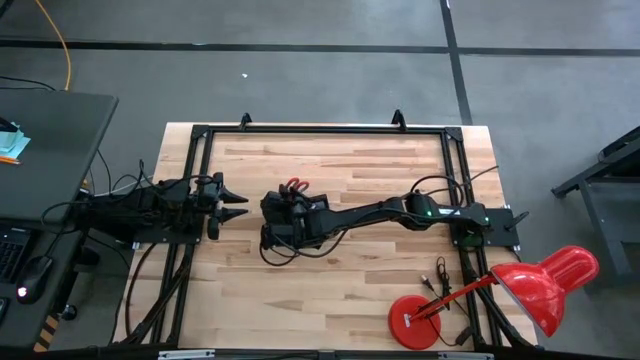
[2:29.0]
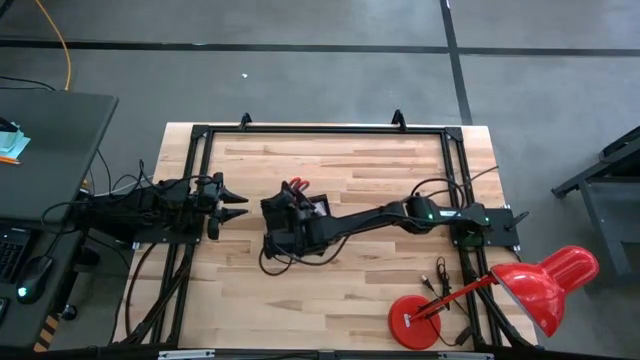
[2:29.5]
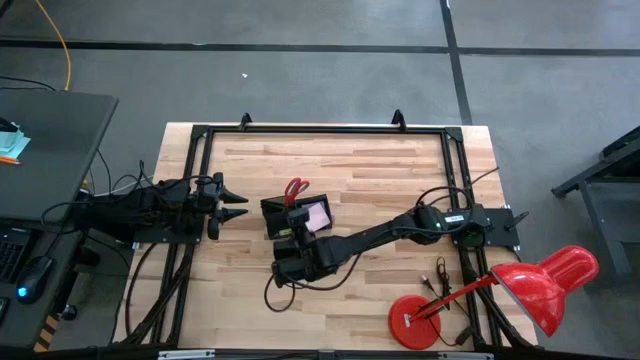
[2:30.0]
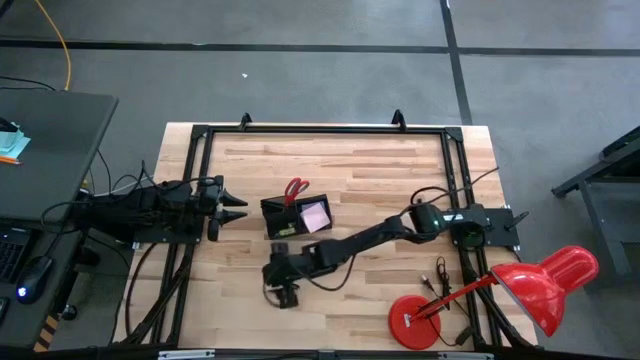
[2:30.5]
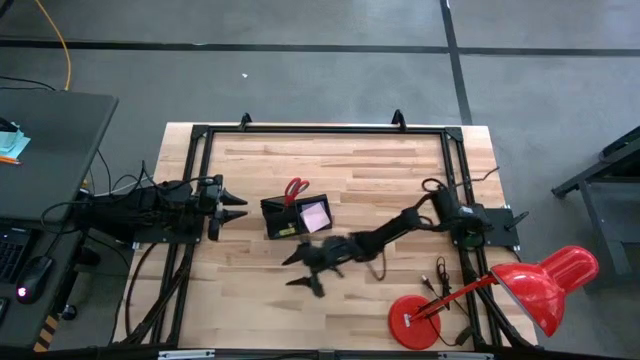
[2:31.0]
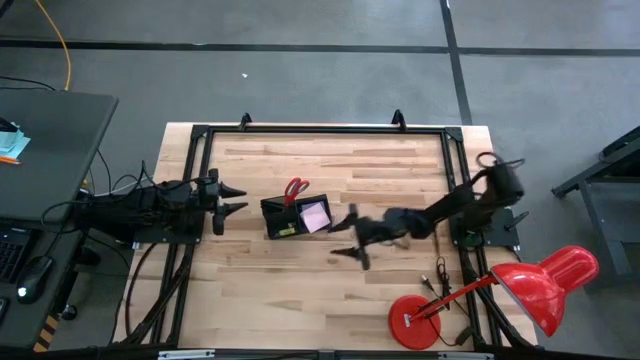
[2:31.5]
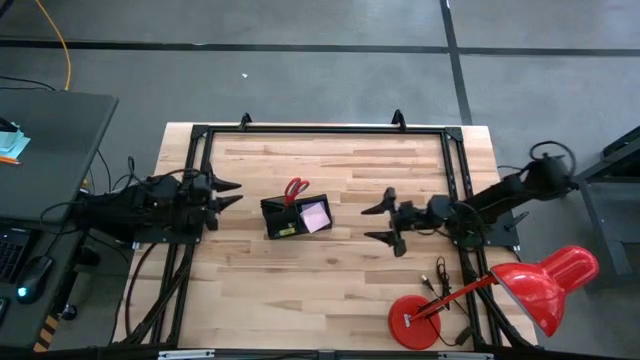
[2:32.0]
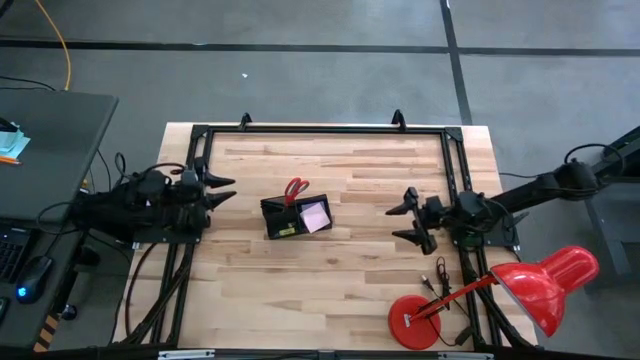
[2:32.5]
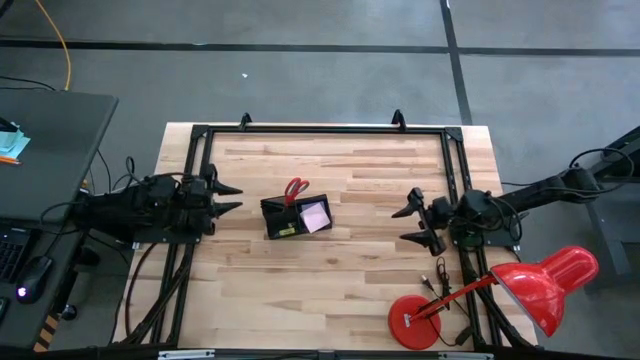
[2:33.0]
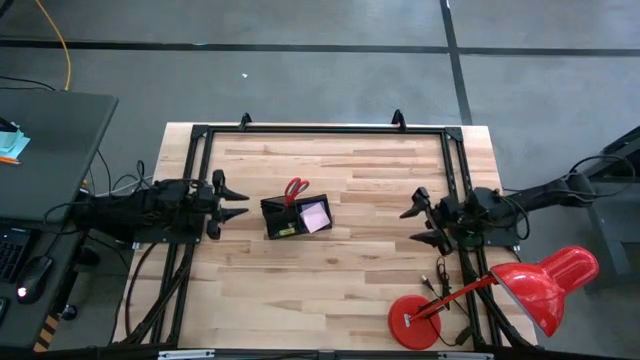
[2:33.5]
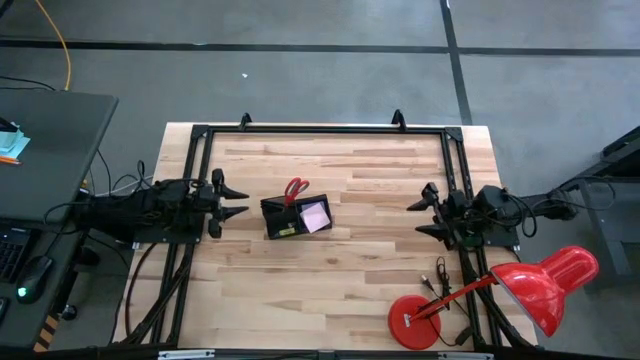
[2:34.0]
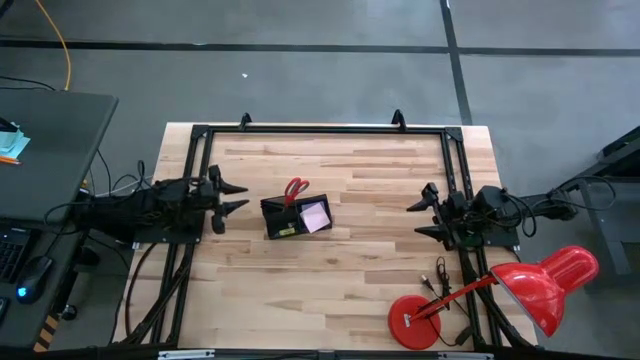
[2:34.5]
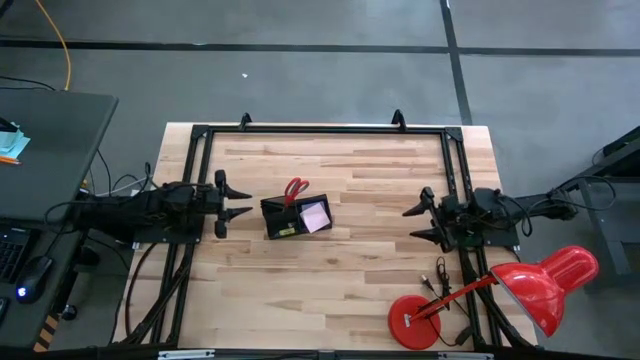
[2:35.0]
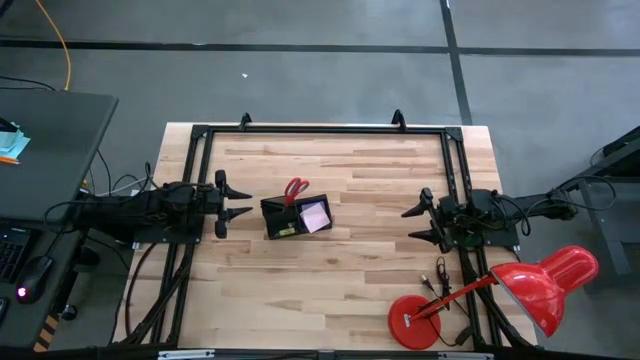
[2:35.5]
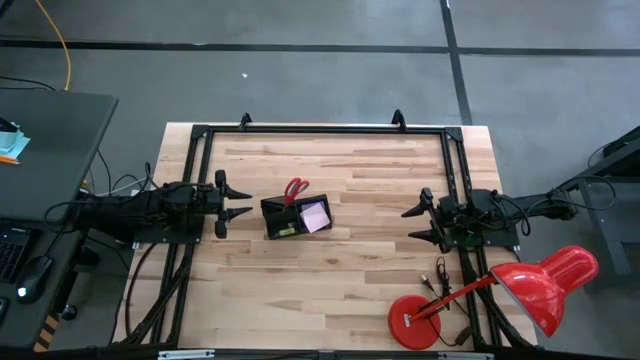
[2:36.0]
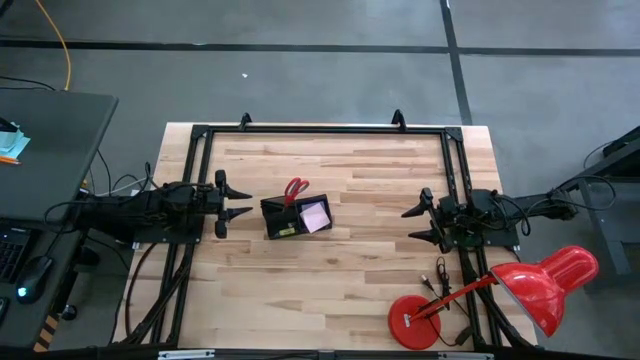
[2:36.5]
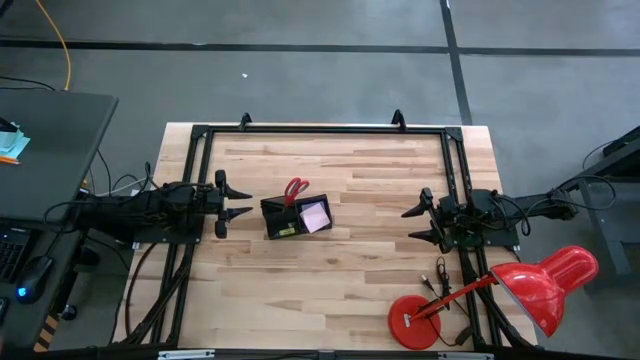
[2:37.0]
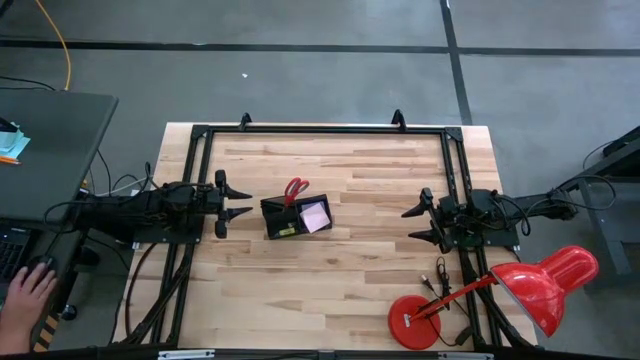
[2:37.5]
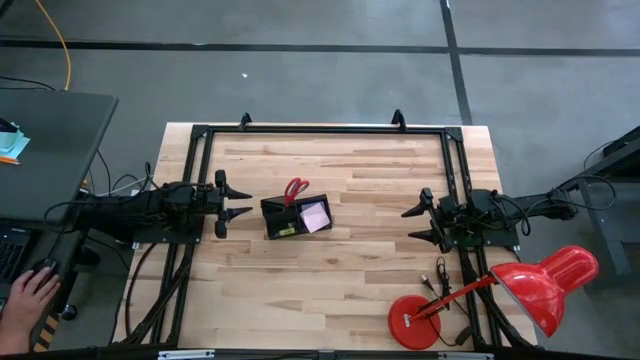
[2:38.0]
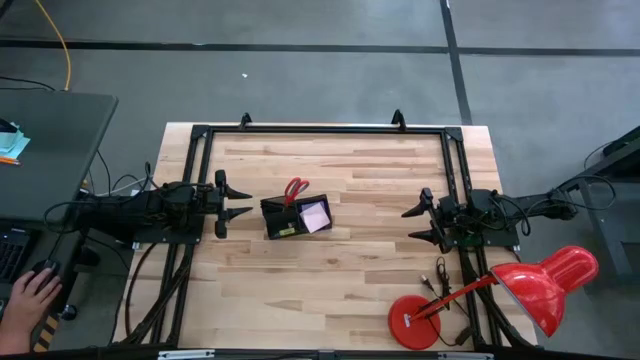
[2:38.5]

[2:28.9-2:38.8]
Task: Pick and place office supplies into organizer
Return to home position
